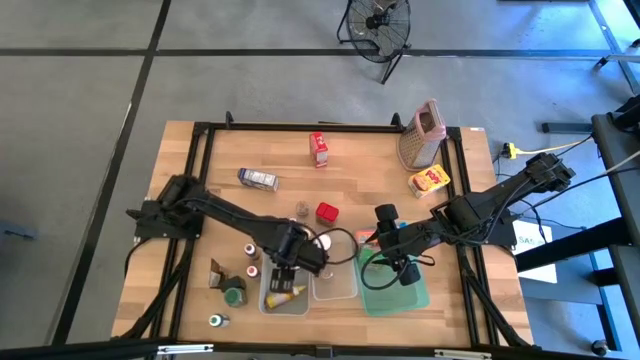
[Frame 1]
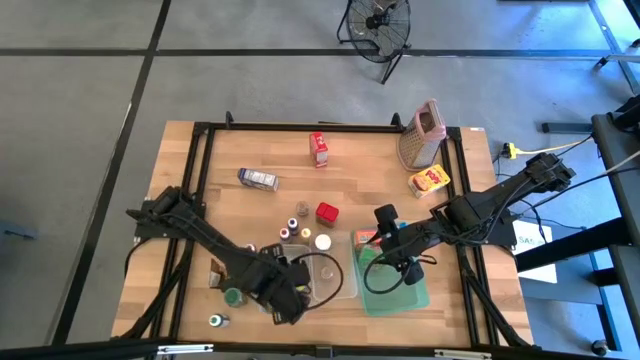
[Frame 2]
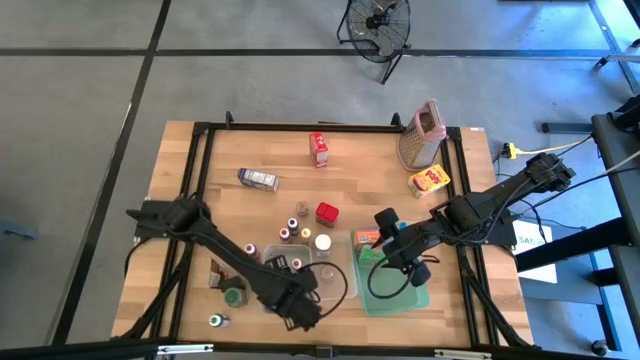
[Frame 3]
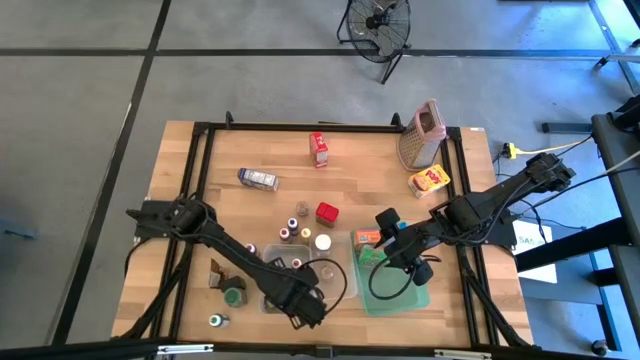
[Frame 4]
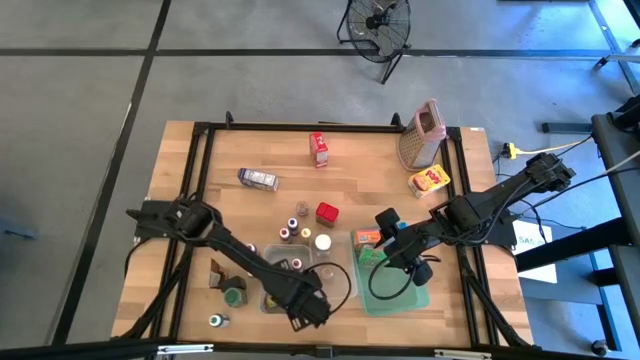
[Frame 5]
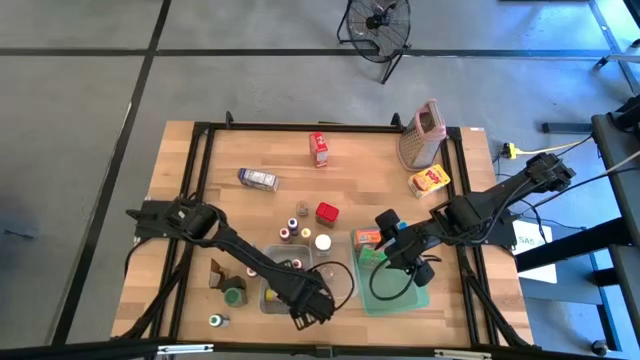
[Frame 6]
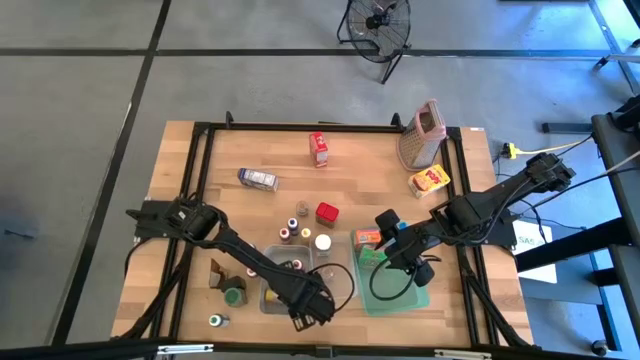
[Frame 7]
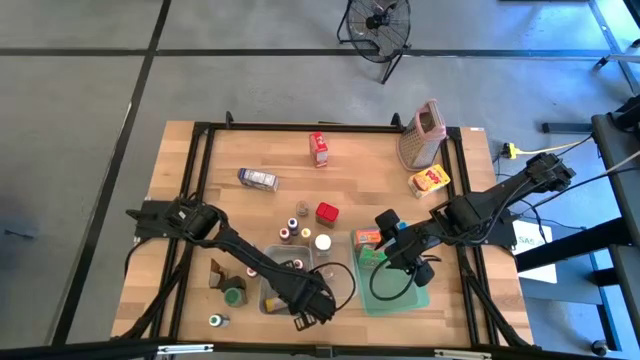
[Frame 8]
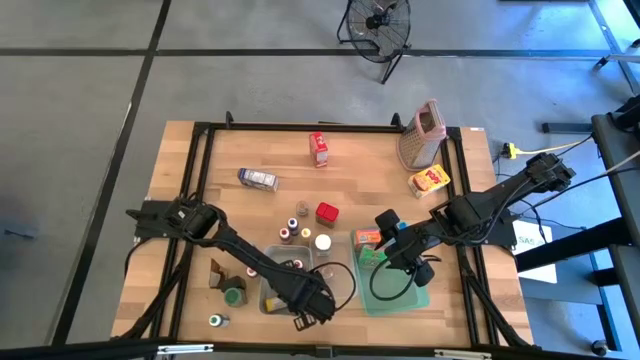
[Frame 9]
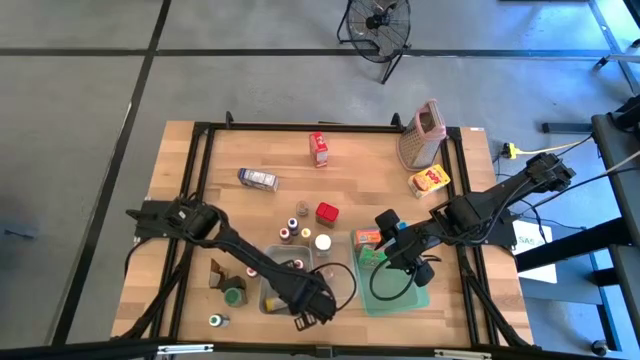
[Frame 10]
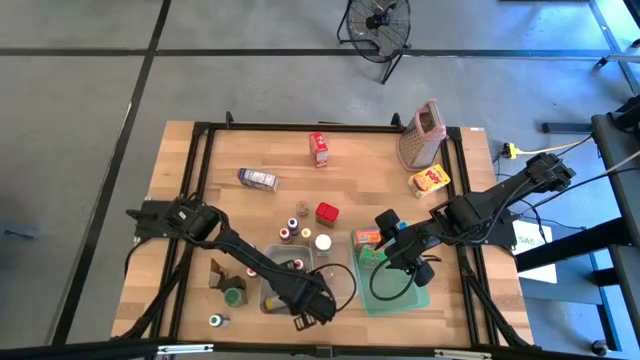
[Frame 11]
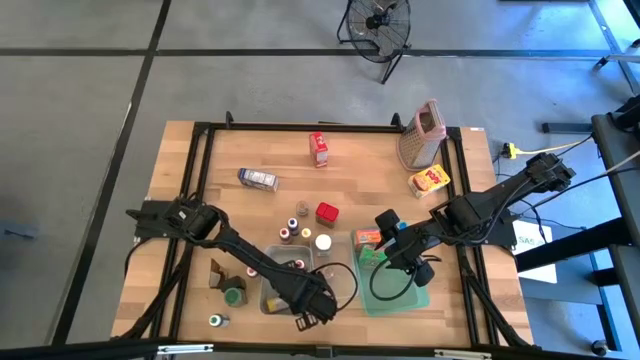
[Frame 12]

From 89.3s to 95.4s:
Task: Pick & Place Kitchen Items
Adjust the yellow food coloring bottle in the gray bin

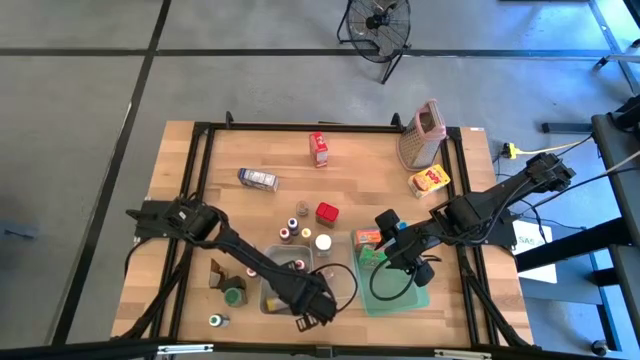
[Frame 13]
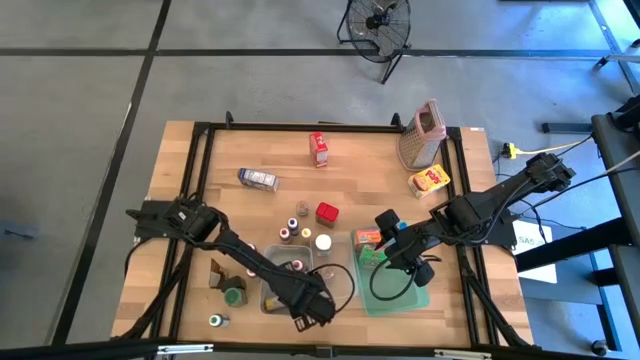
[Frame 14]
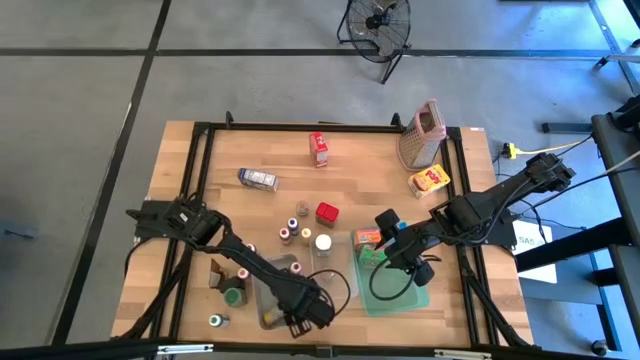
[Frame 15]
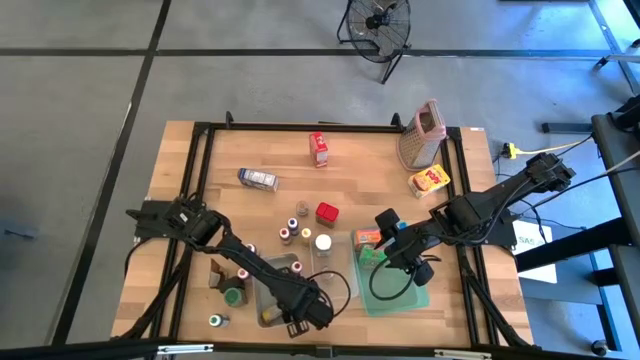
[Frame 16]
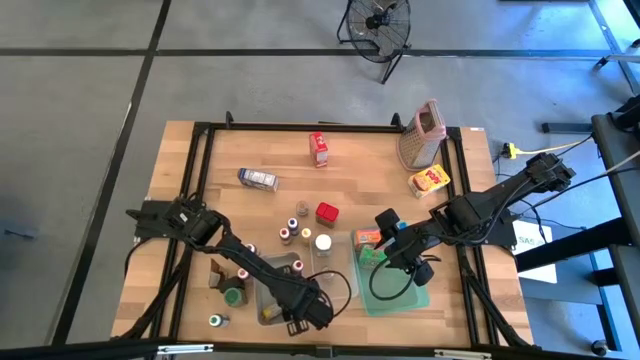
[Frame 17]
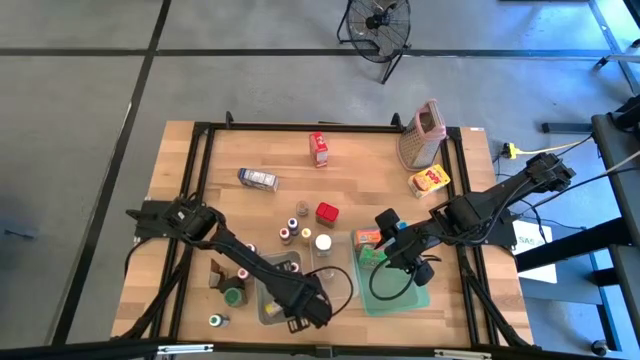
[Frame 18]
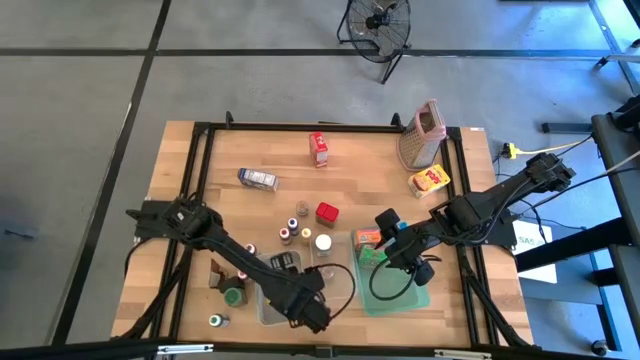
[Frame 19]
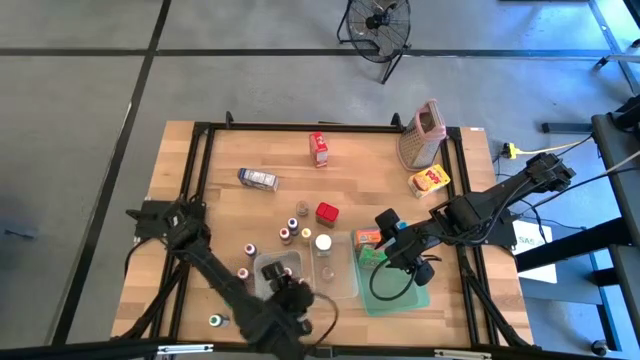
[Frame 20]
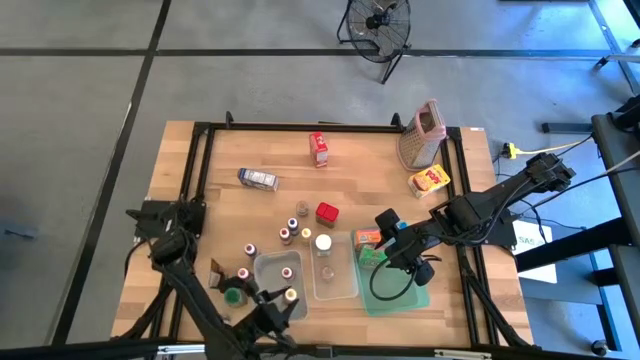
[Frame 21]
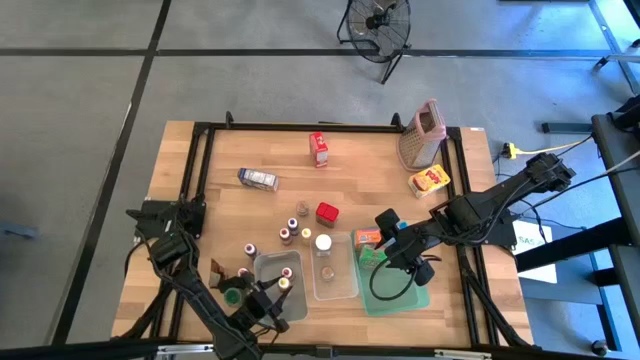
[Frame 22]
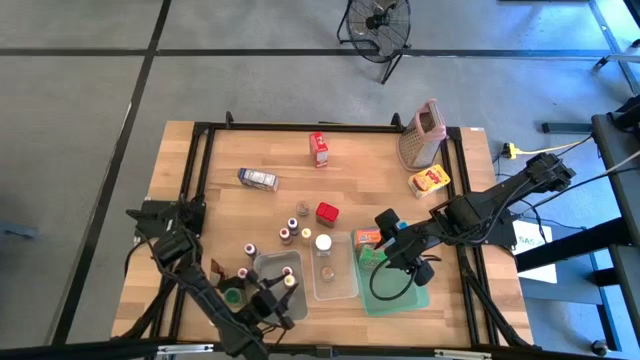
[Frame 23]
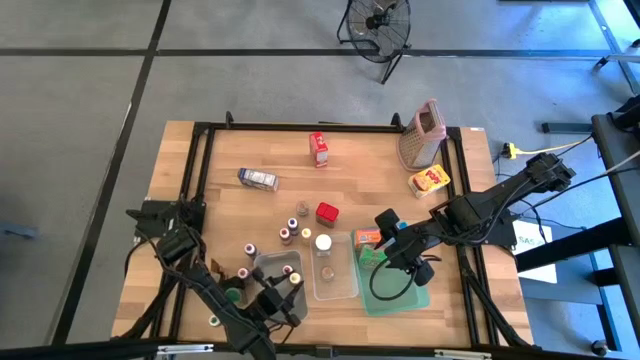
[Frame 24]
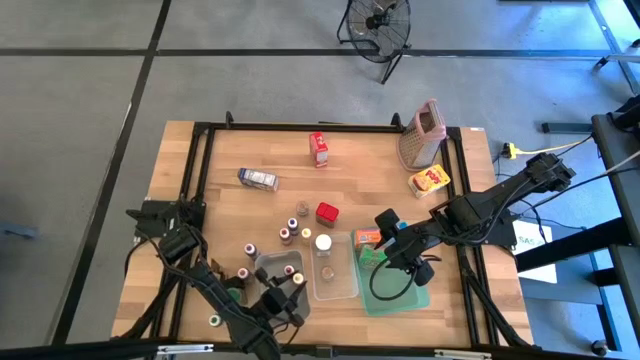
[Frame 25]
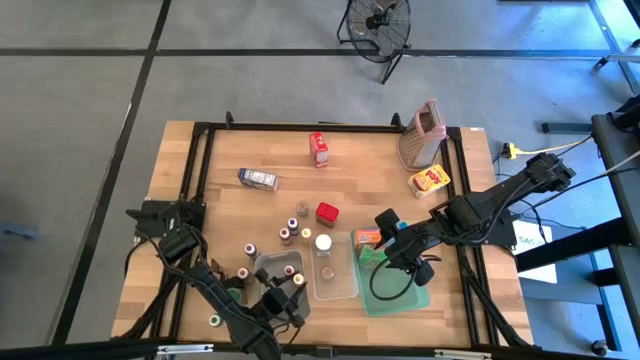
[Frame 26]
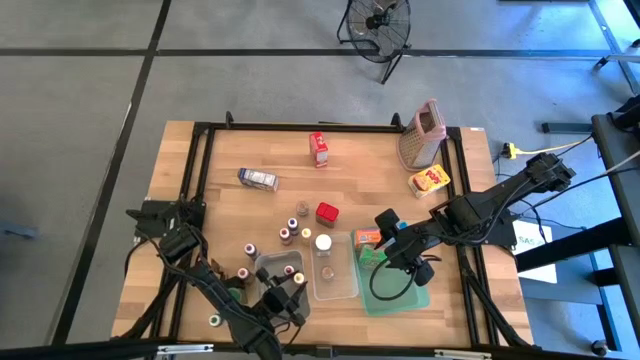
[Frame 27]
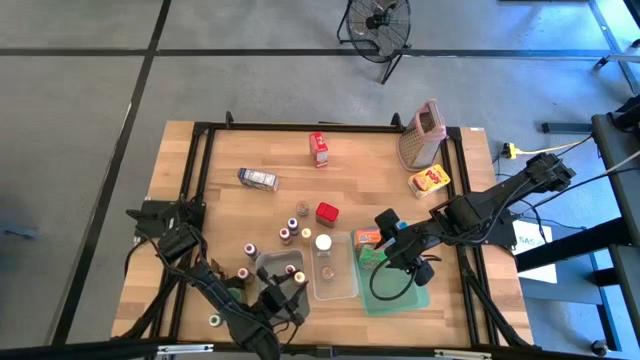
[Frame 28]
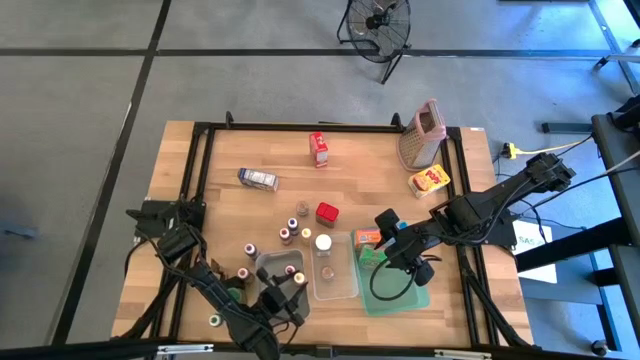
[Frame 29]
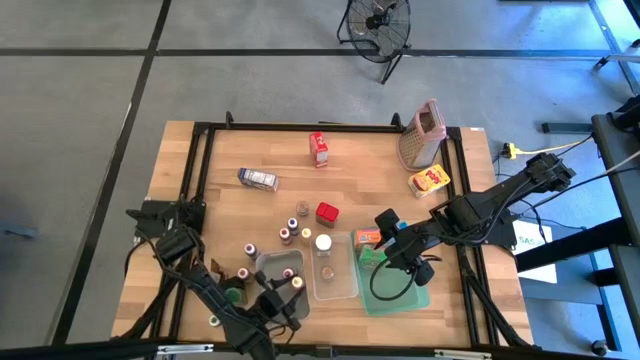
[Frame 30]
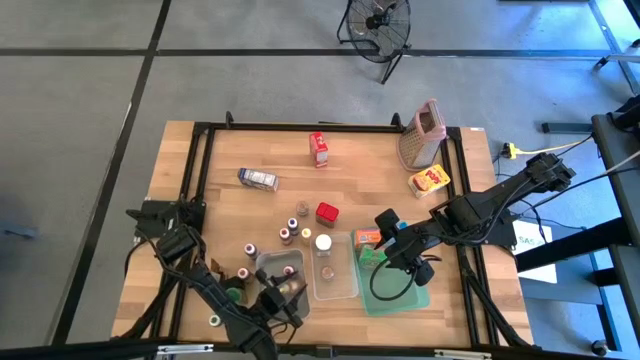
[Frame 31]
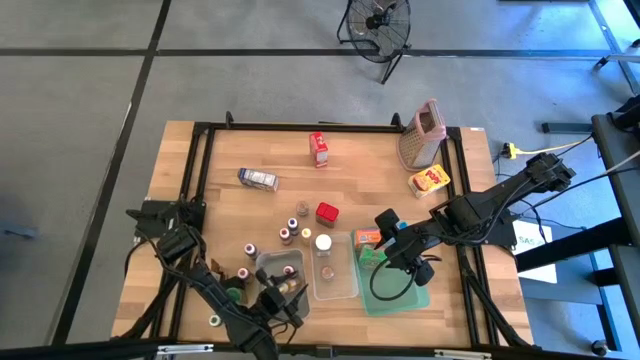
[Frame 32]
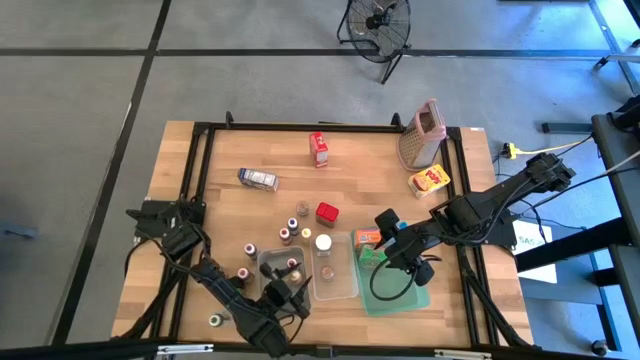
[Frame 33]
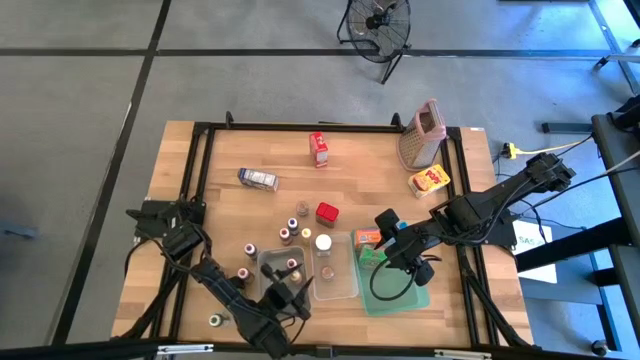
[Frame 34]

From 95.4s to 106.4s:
Adjust the yellow food coloring bottle in the gray bin

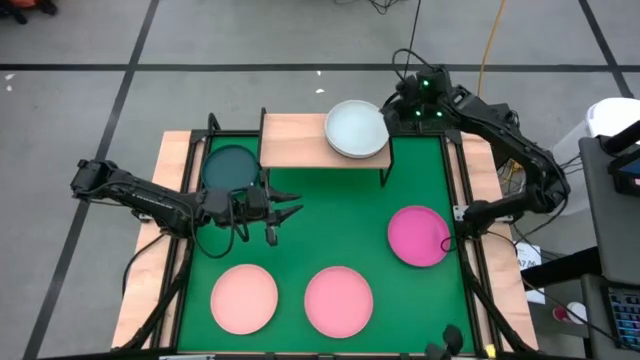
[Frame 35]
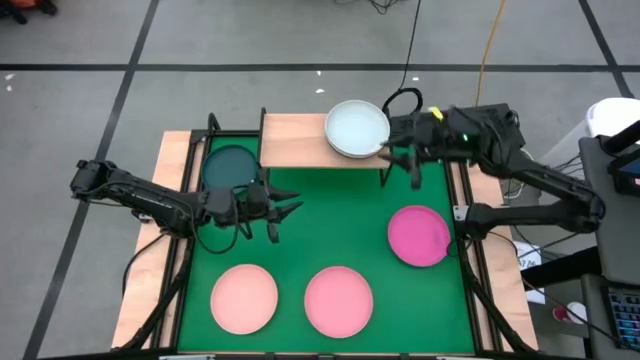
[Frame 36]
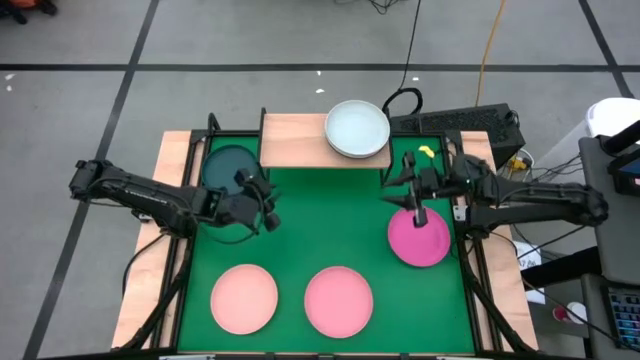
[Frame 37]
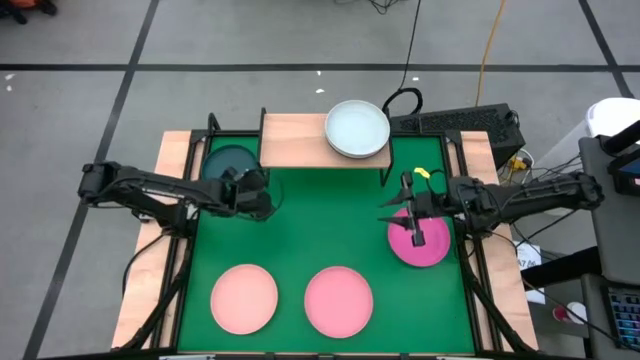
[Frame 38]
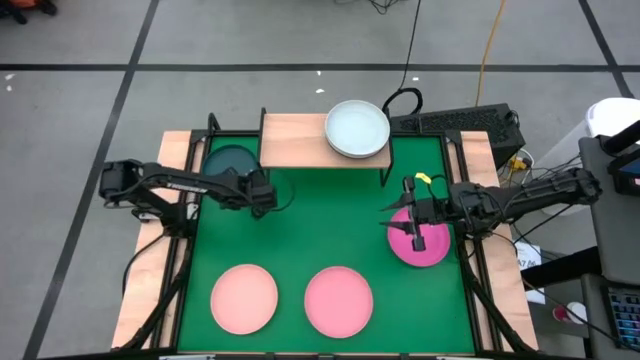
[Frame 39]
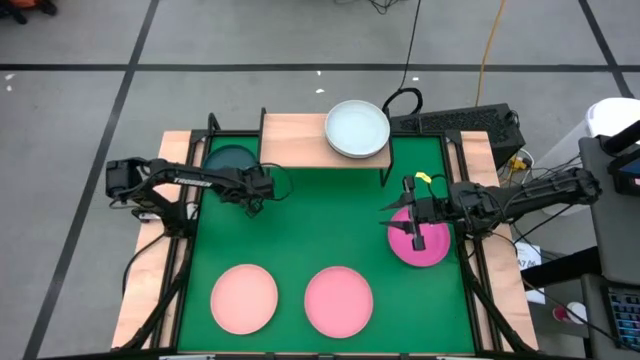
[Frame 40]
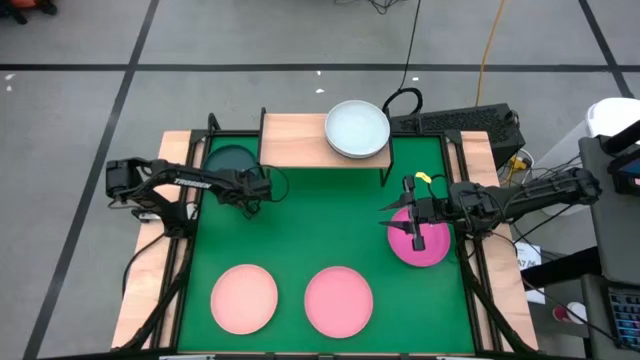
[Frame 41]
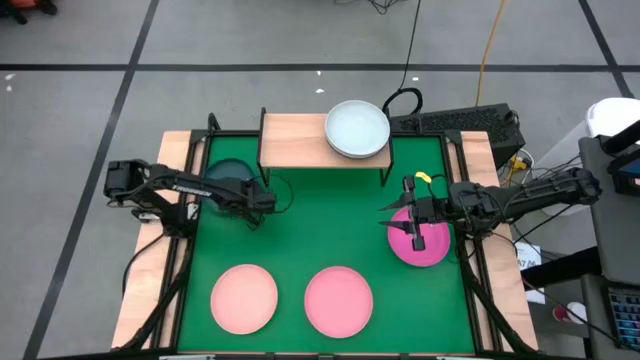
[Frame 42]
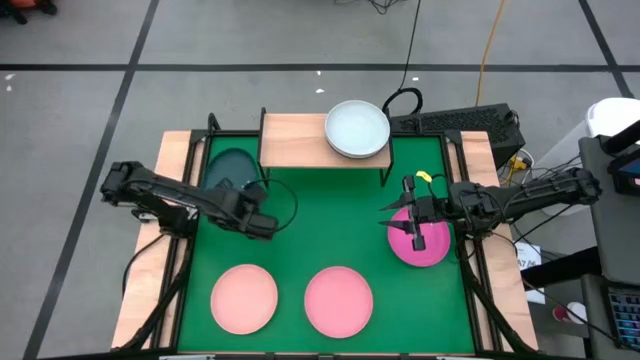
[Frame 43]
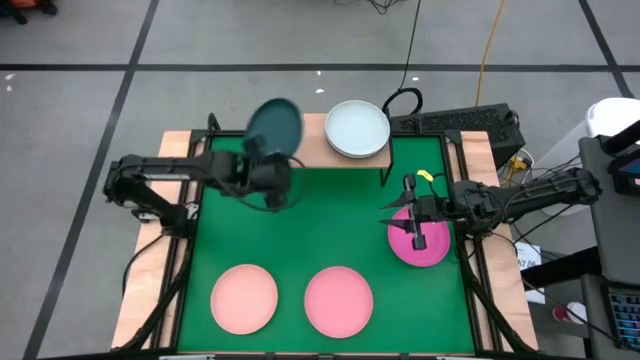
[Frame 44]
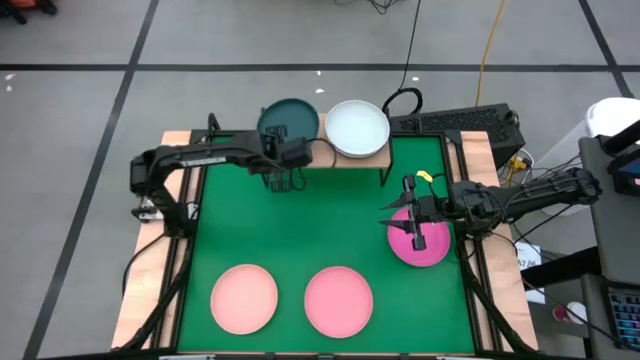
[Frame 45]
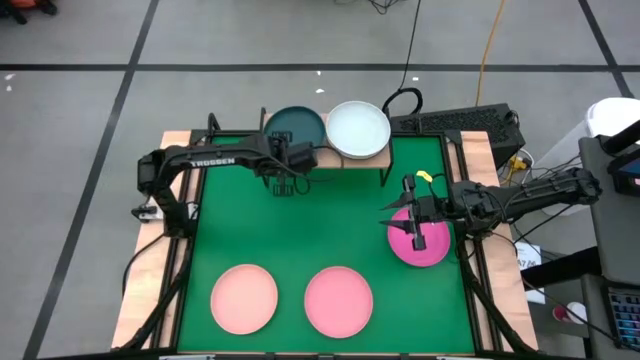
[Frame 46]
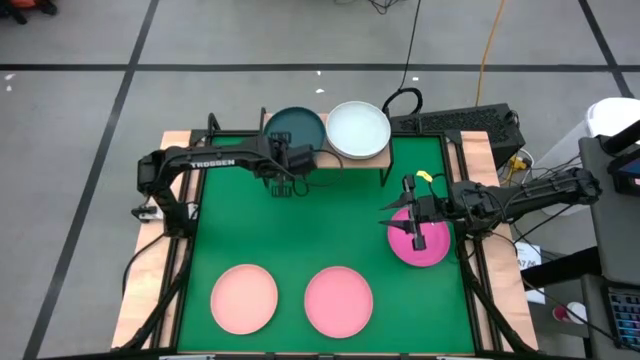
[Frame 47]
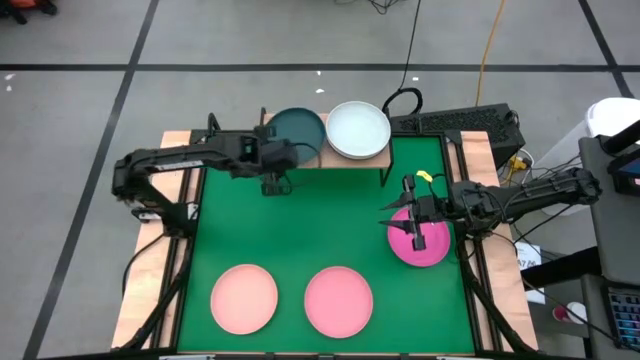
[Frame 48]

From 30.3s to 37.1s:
Task: Place and stack plates onto a shelf
Put the black plate on the shelf
